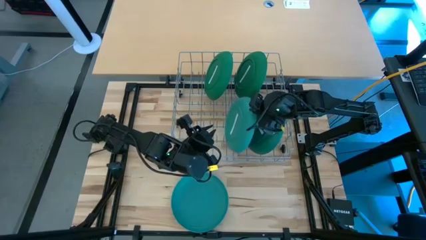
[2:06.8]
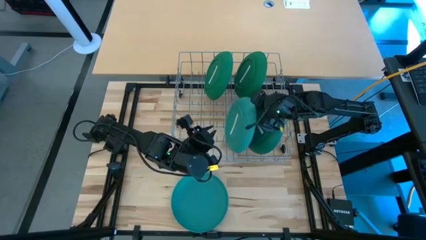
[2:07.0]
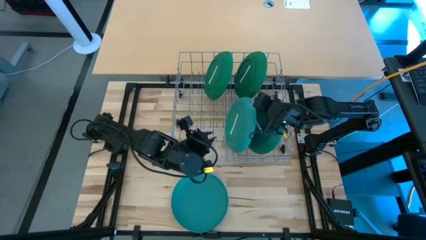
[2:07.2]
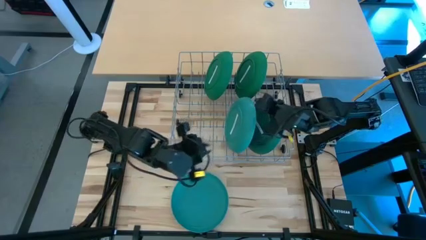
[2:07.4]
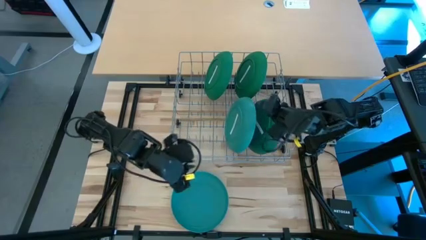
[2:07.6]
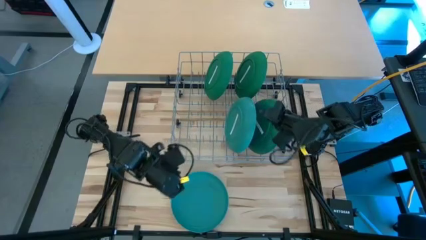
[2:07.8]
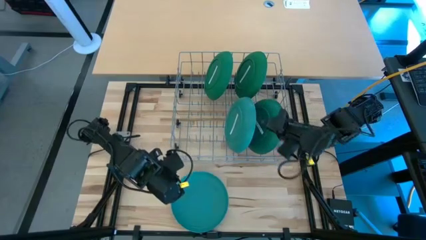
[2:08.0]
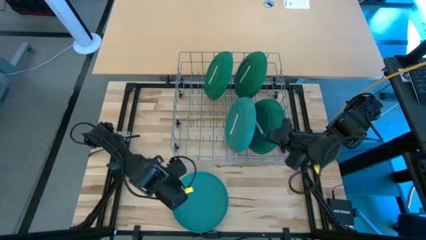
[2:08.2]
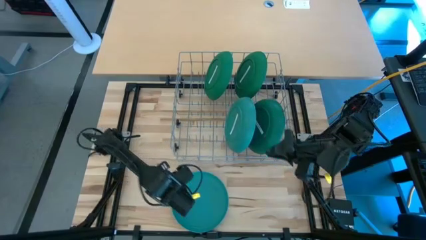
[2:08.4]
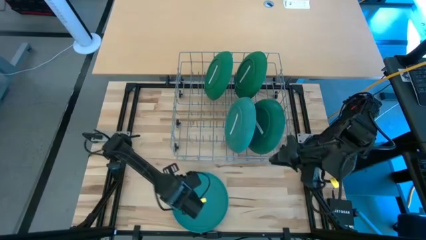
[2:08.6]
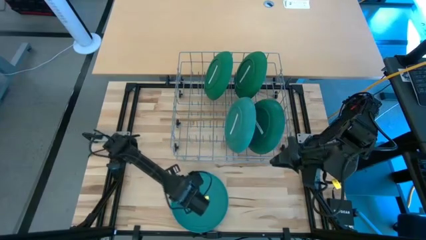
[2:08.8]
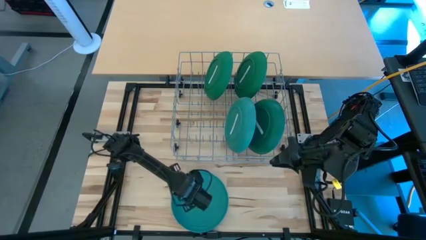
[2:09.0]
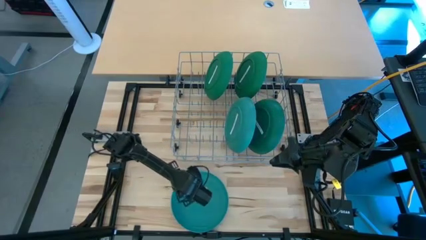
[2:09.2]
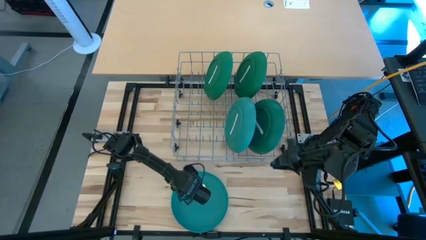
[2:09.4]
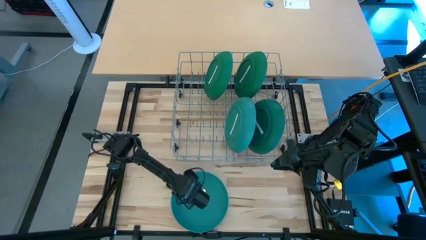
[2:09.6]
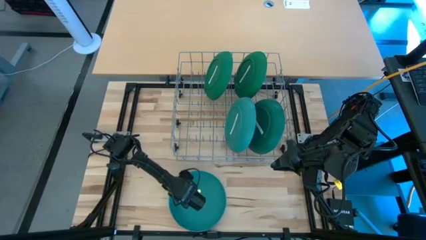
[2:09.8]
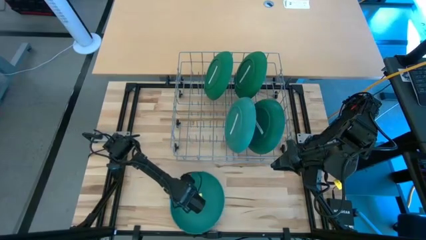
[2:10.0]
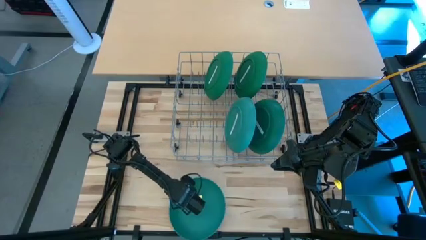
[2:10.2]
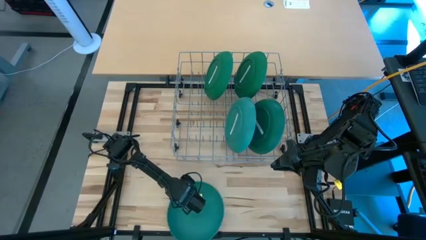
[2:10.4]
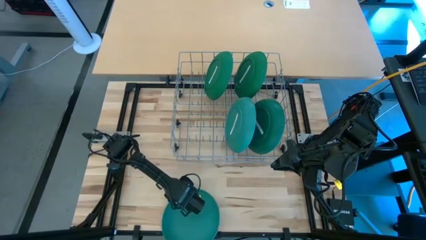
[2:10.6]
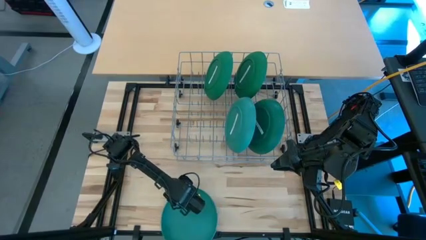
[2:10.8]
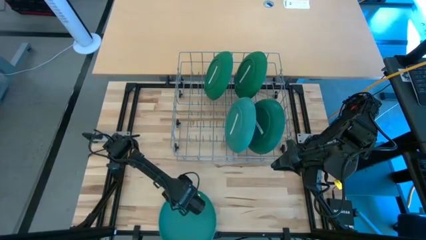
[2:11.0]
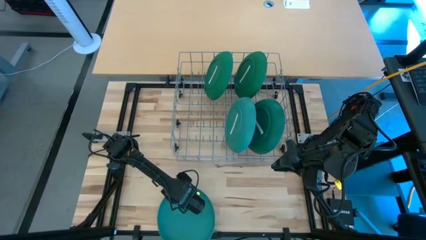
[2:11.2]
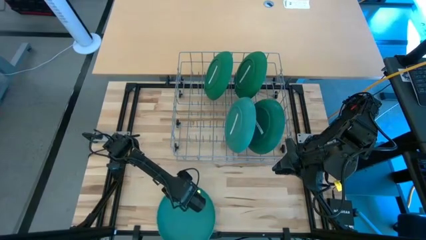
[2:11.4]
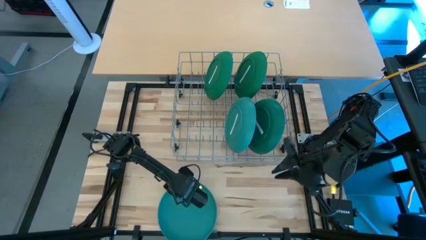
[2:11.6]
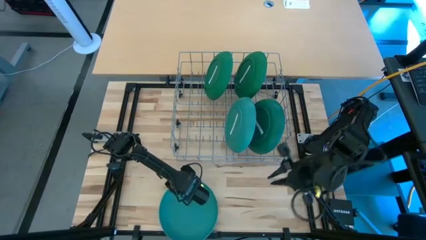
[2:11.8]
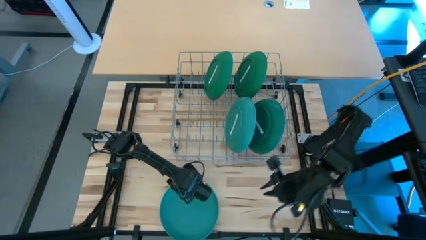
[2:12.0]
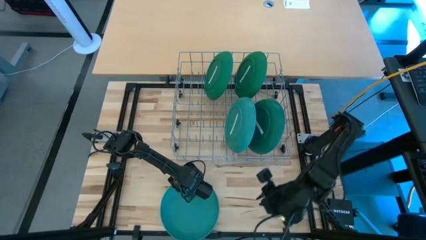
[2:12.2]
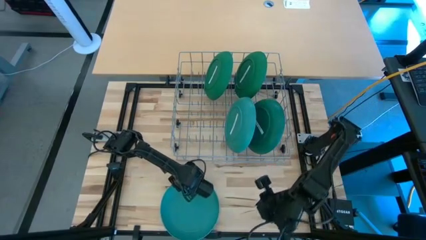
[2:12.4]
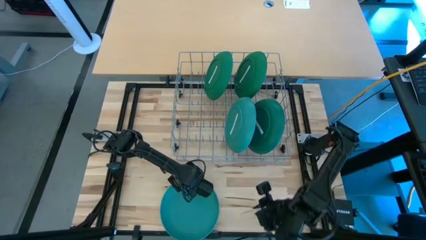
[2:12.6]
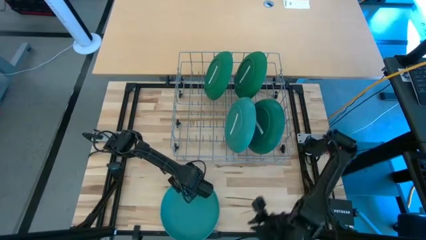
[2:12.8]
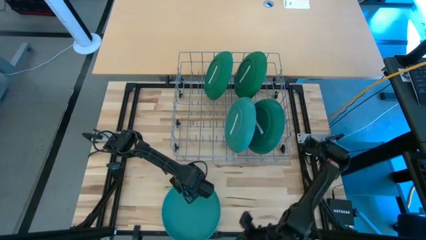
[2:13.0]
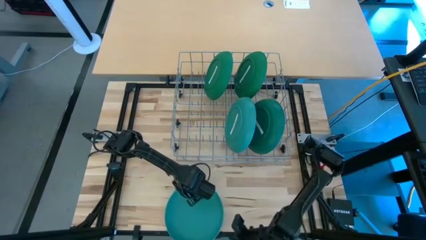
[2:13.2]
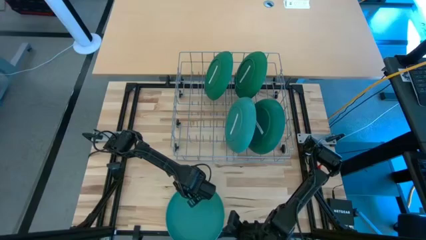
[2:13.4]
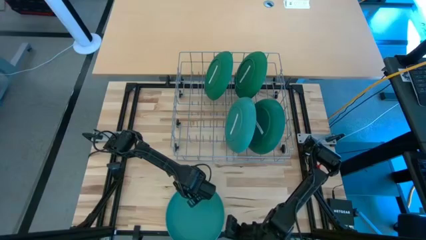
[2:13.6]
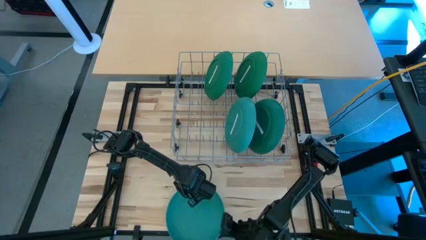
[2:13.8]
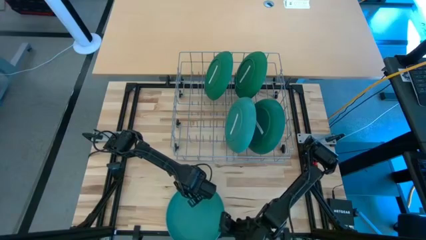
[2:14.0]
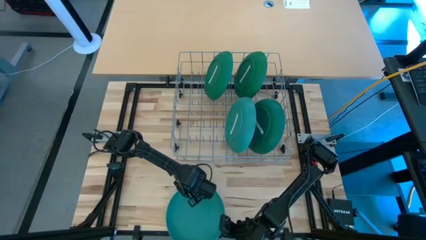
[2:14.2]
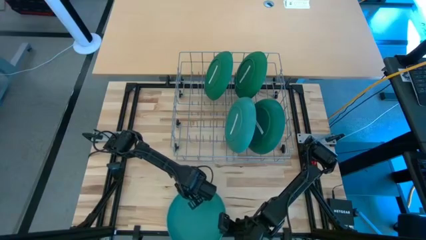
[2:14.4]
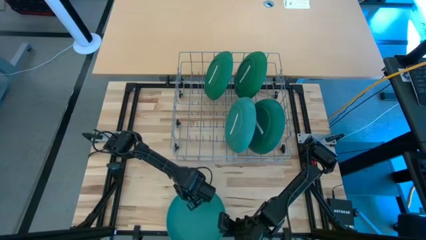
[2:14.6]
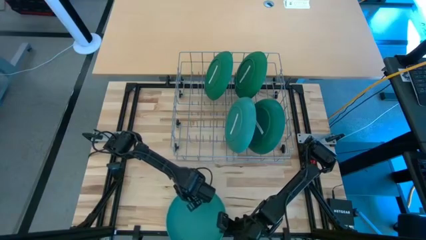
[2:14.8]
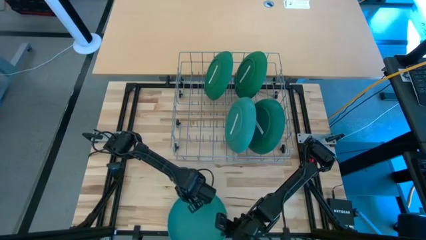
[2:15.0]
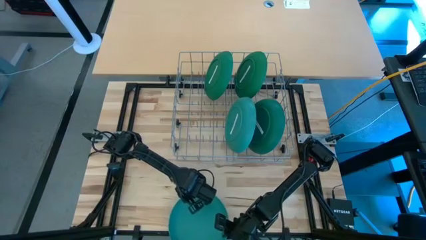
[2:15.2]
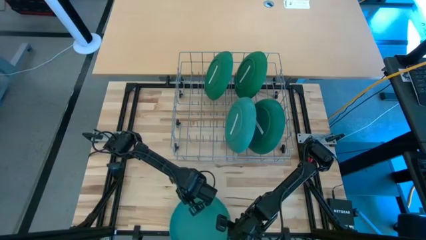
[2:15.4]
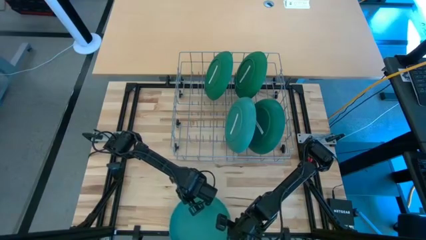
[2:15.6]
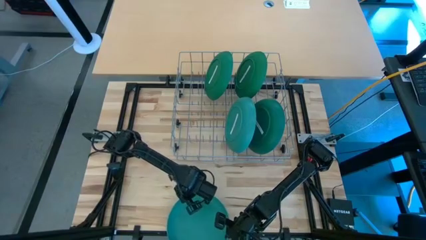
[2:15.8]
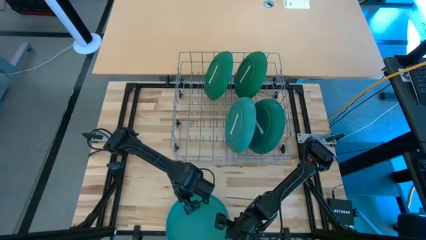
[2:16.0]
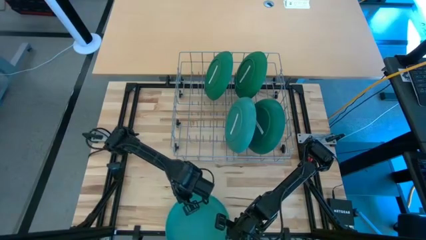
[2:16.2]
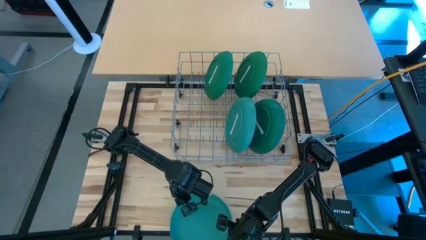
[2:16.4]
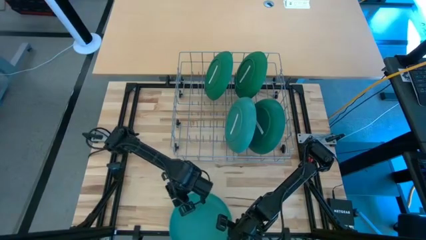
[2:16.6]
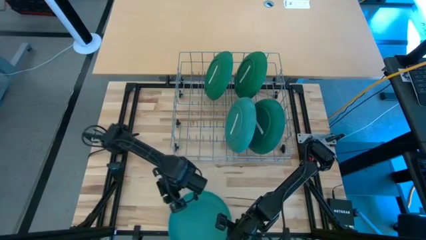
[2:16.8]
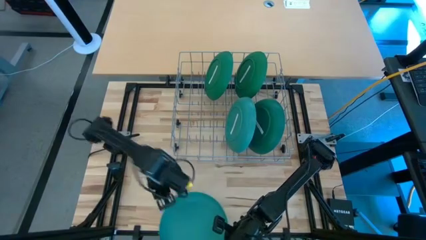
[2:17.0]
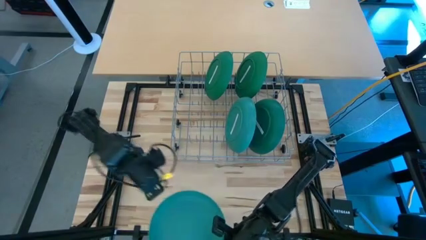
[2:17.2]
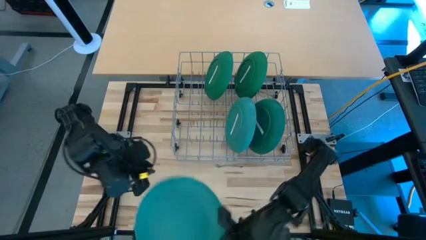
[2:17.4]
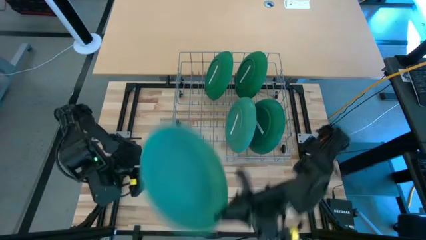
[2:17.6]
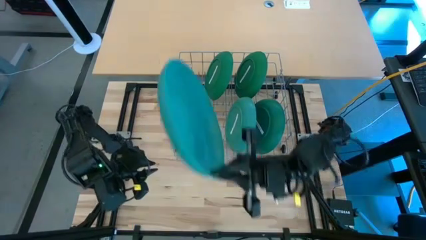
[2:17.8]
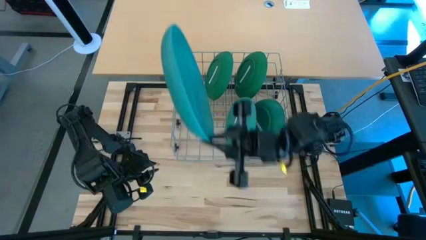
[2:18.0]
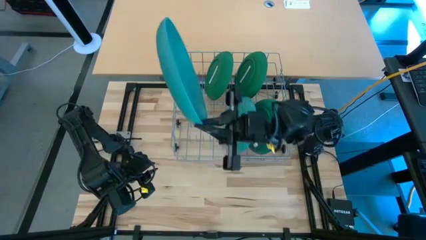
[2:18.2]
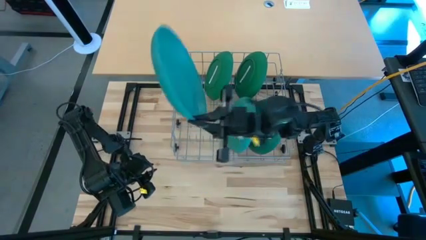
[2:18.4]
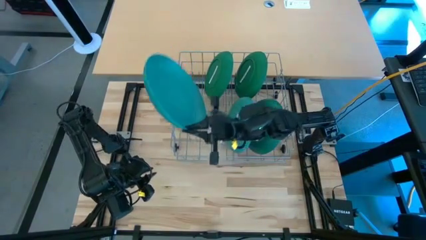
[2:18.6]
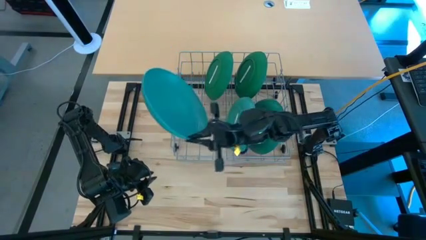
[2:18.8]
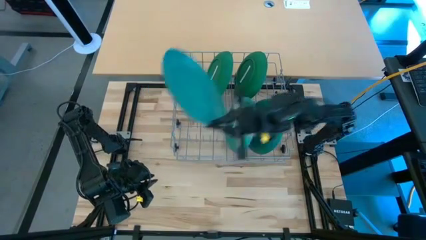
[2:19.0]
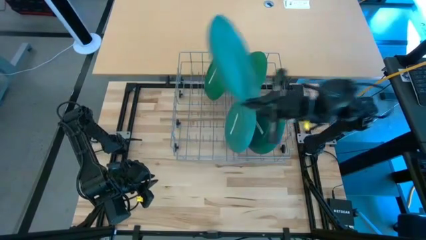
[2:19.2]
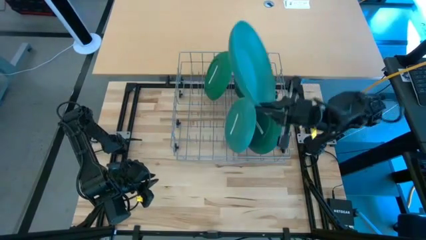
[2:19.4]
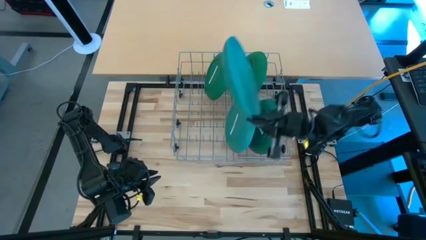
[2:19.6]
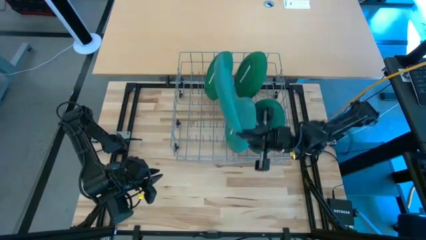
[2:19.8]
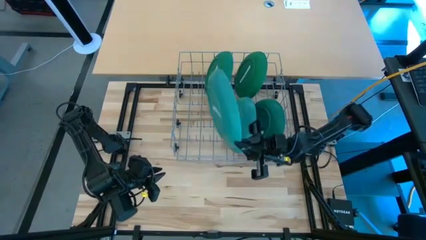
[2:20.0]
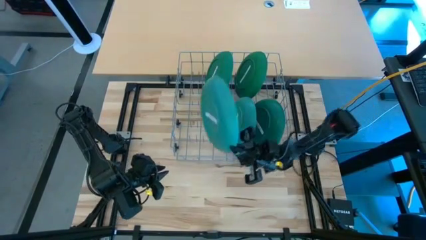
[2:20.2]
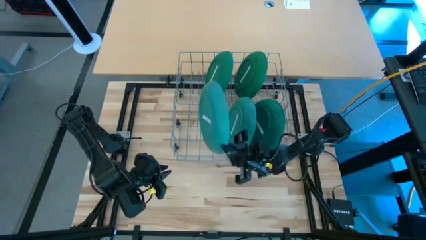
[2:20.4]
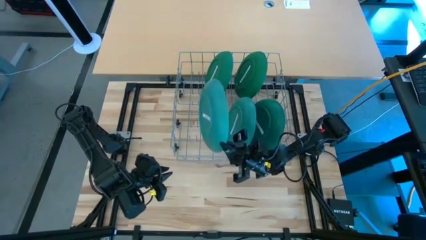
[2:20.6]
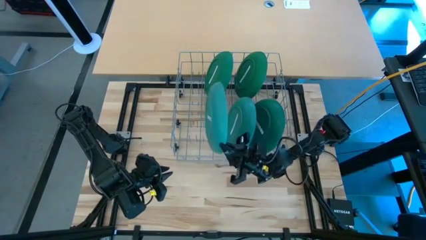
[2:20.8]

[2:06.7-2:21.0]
Task: Sort dishes
Put the blue plate into the dish rack
